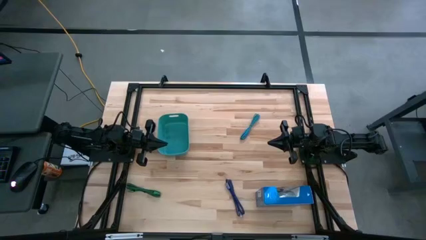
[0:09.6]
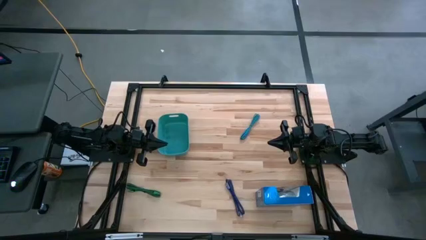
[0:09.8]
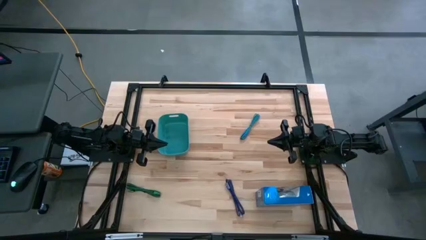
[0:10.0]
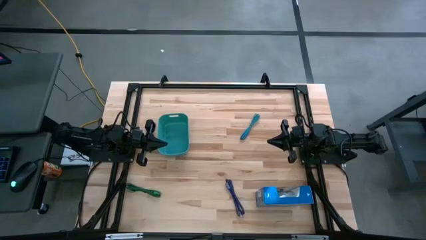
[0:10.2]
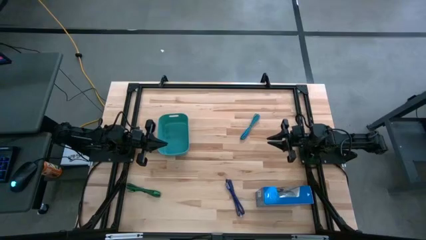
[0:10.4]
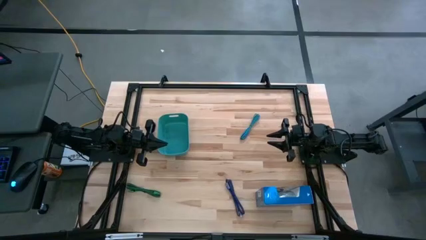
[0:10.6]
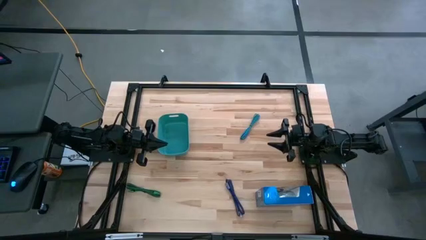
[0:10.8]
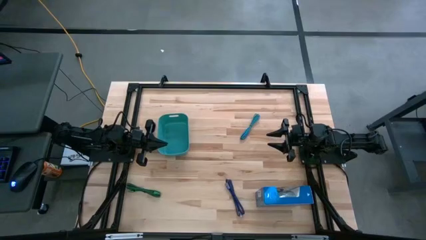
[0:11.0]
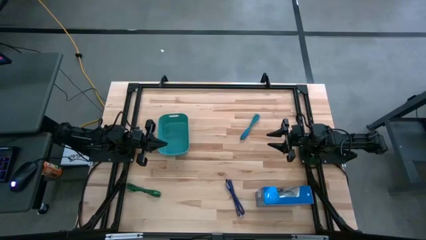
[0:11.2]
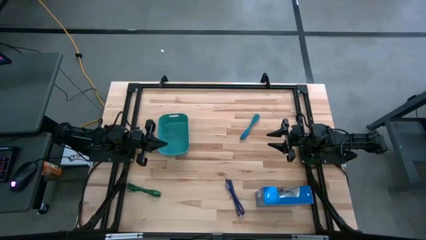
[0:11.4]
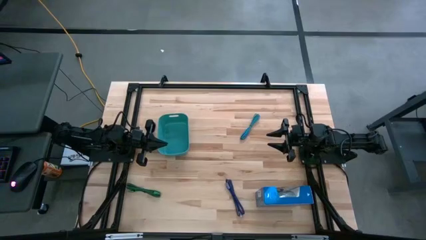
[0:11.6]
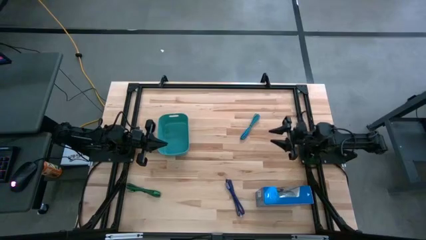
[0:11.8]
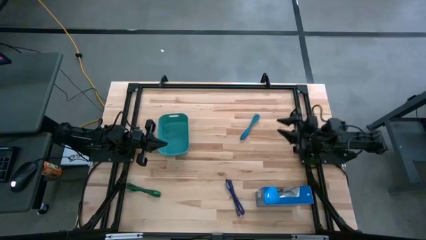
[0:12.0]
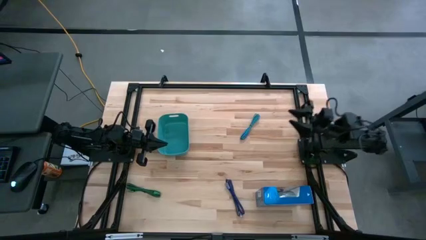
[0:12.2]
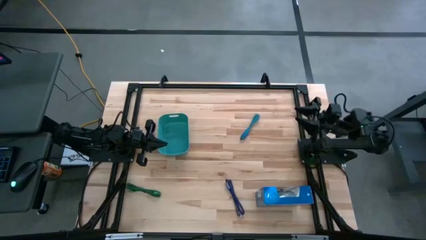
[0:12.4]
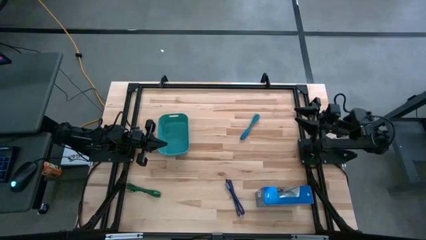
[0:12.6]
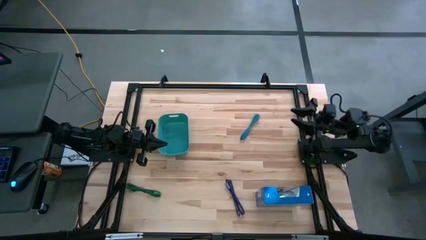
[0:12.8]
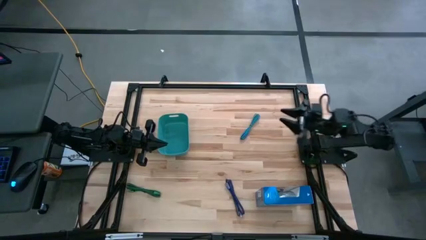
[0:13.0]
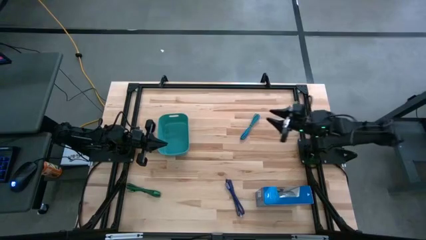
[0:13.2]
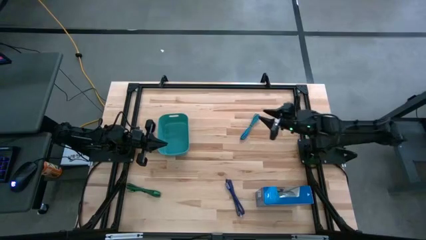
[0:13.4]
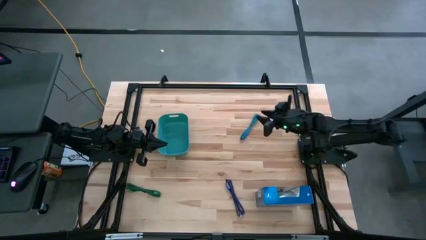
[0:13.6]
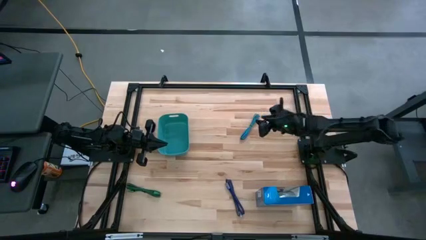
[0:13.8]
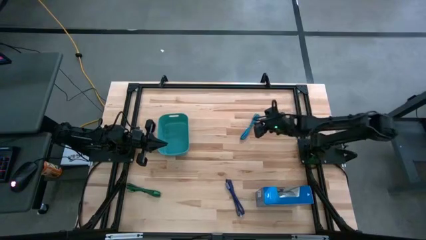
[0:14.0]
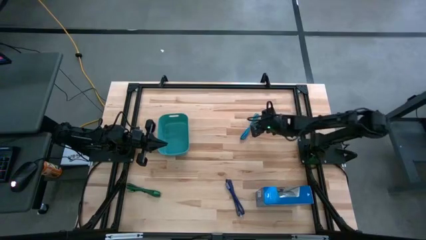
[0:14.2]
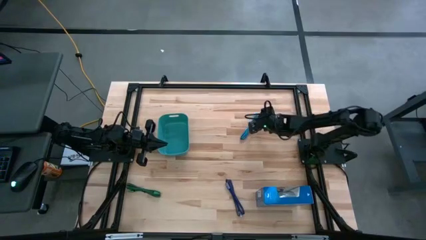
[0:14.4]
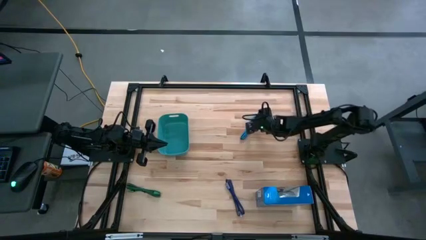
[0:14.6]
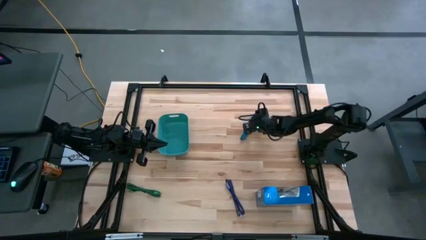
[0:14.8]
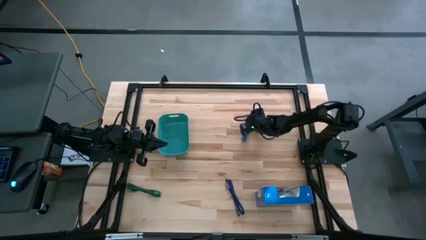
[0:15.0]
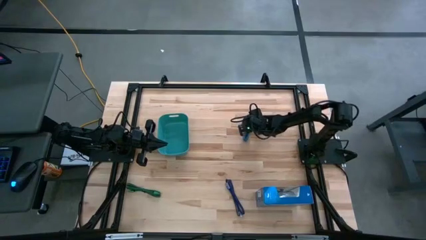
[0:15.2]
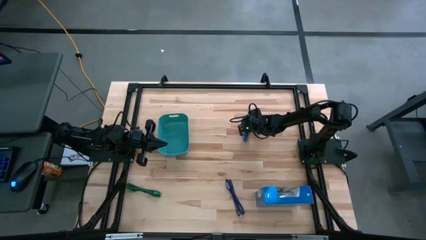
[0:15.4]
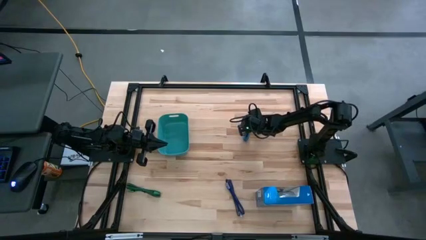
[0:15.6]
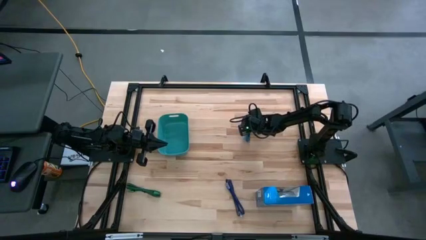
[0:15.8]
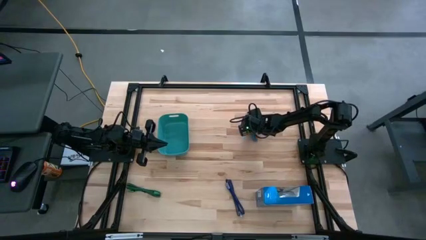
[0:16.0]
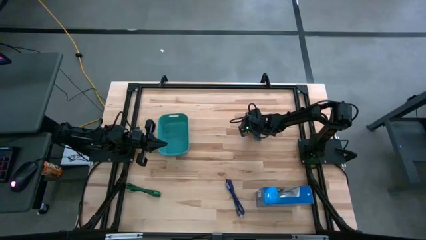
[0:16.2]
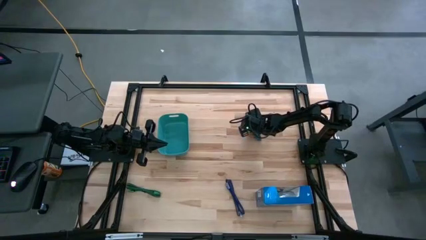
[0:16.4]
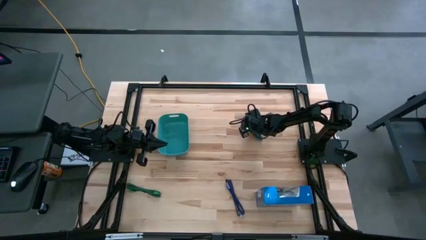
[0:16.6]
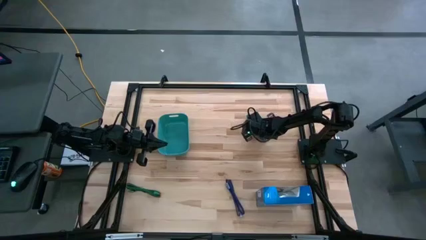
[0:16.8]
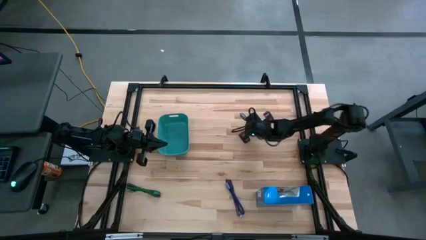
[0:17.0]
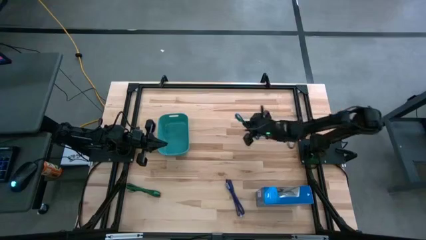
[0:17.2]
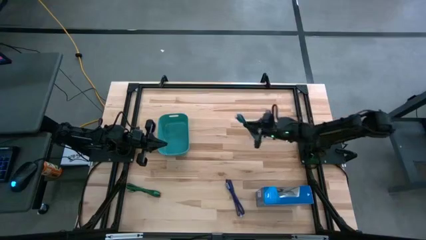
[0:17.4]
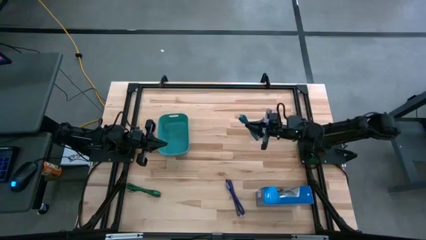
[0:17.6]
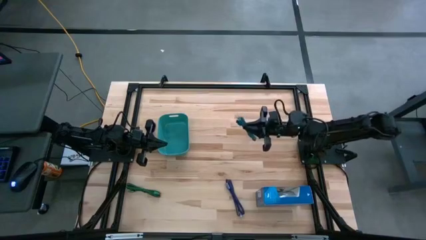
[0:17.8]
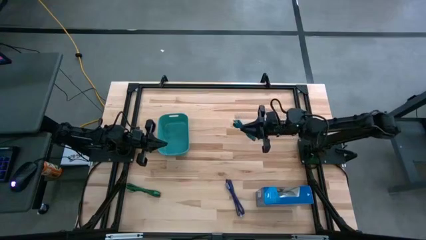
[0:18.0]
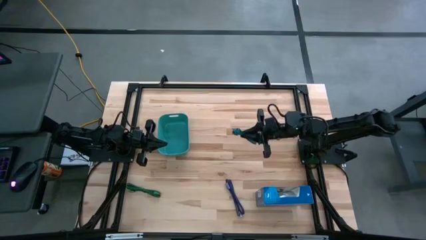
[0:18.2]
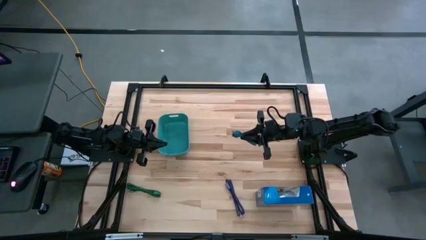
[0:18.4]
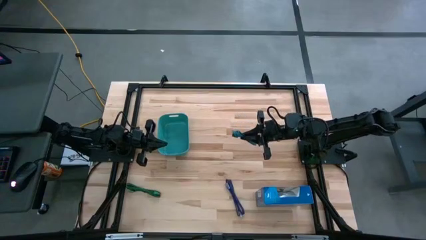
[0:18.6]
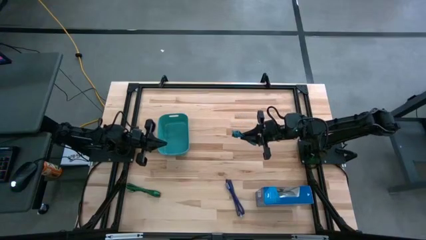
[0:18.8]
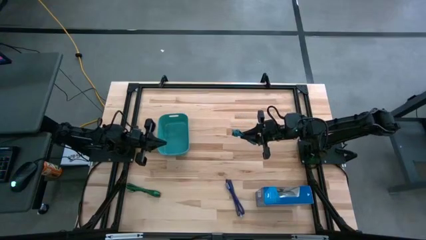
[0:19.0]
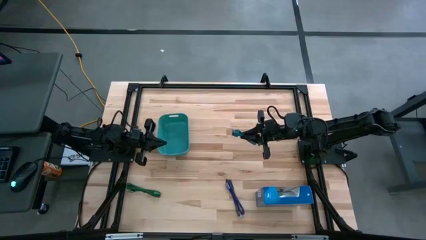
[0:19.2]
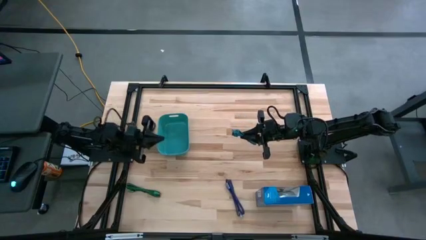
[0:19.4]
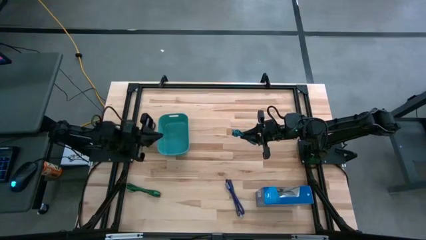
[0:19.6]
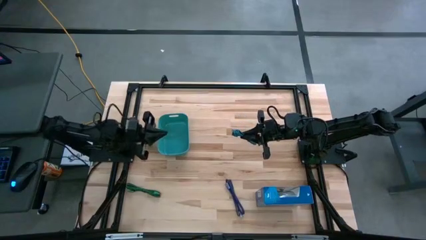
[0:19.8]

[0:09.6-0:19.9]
Task: Pick and place USB-C Cables
Put the blue charger cable into the bin

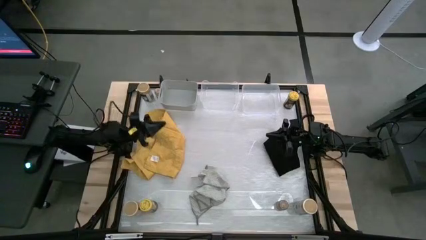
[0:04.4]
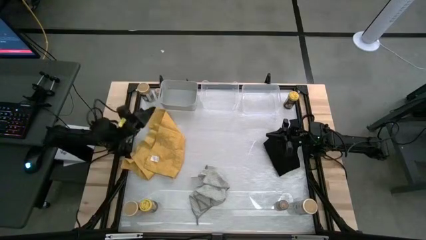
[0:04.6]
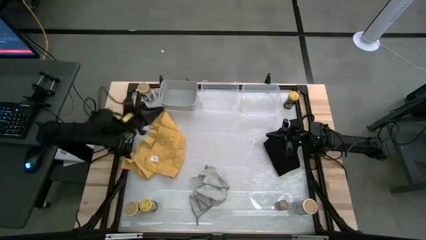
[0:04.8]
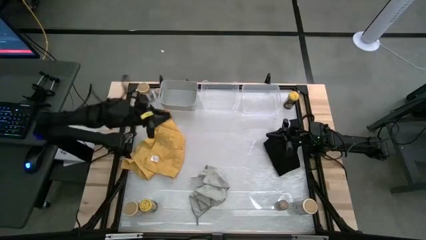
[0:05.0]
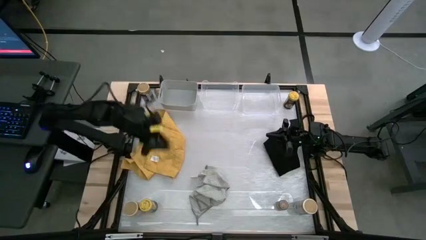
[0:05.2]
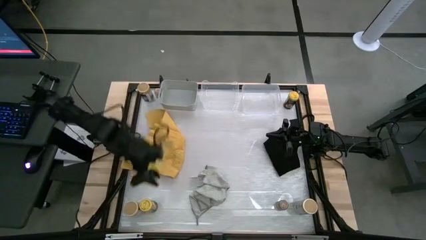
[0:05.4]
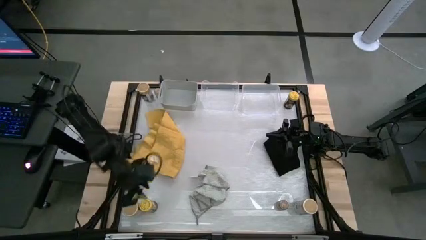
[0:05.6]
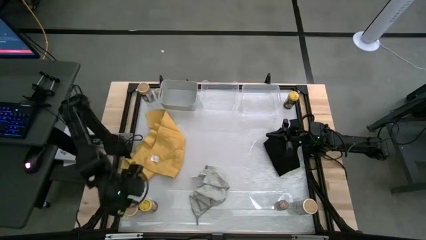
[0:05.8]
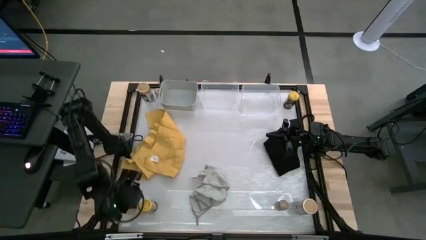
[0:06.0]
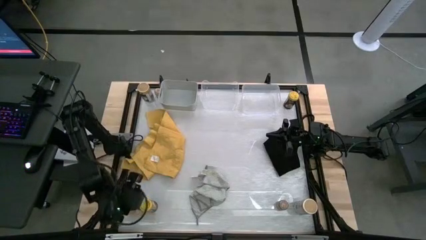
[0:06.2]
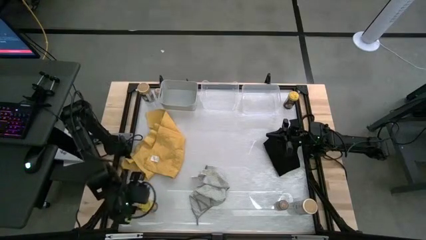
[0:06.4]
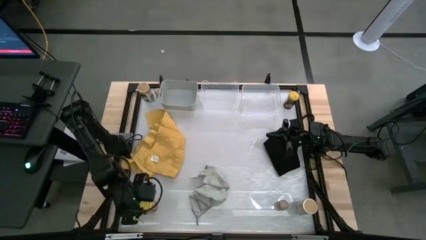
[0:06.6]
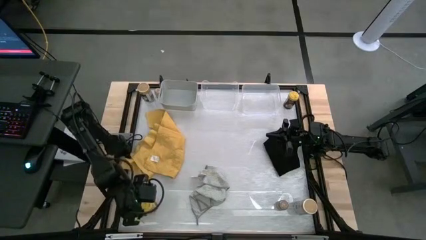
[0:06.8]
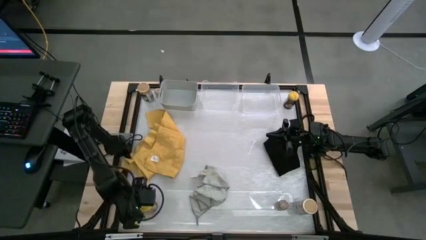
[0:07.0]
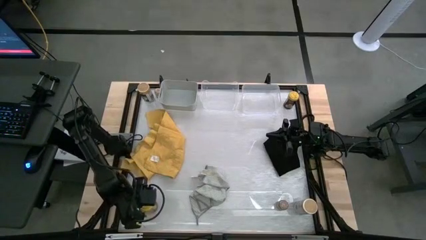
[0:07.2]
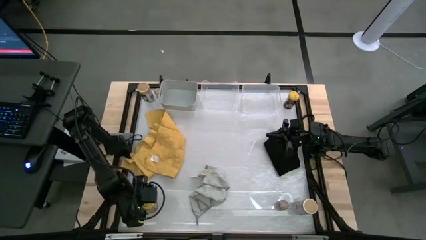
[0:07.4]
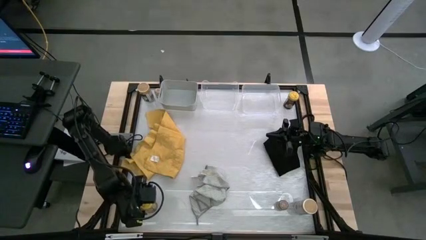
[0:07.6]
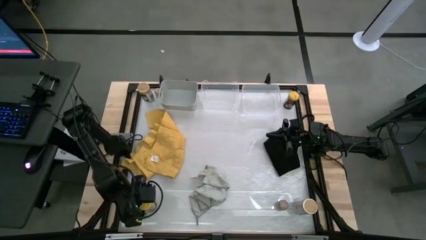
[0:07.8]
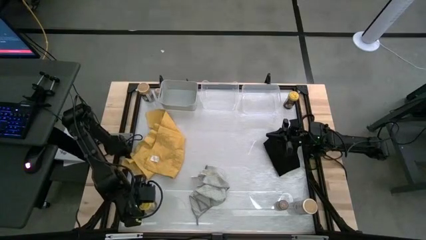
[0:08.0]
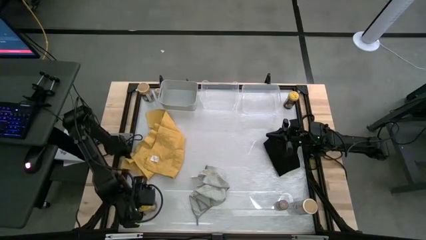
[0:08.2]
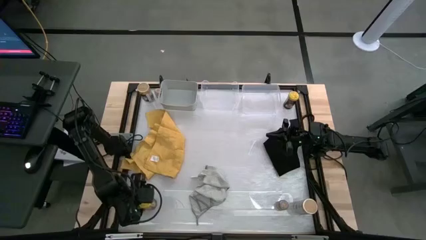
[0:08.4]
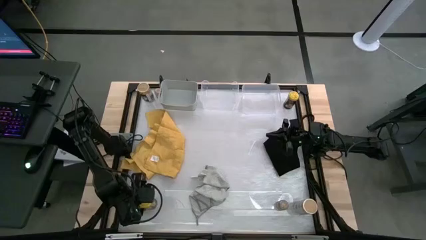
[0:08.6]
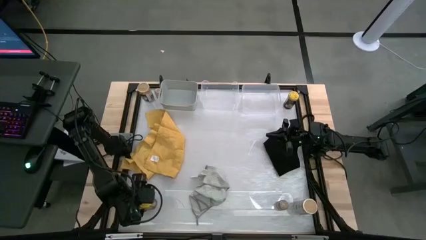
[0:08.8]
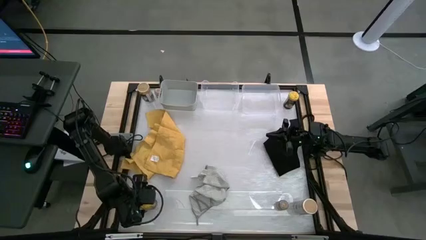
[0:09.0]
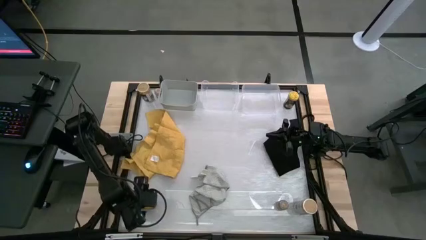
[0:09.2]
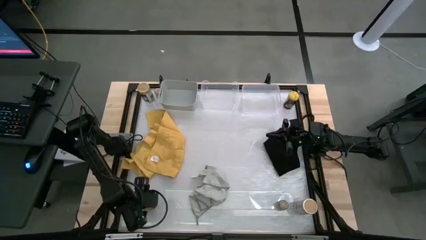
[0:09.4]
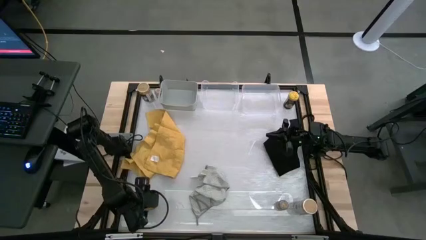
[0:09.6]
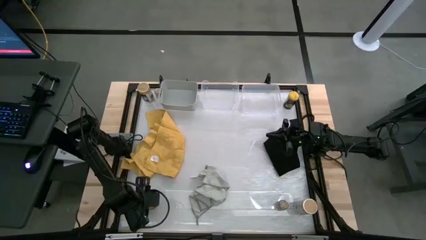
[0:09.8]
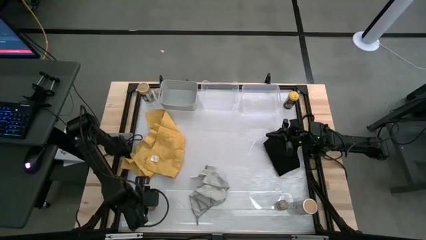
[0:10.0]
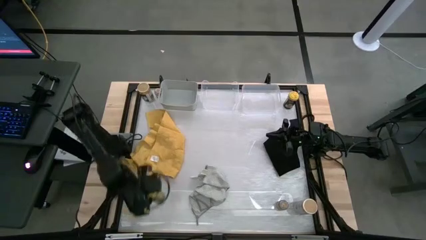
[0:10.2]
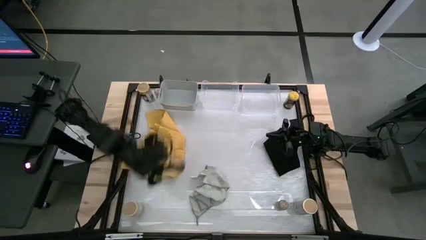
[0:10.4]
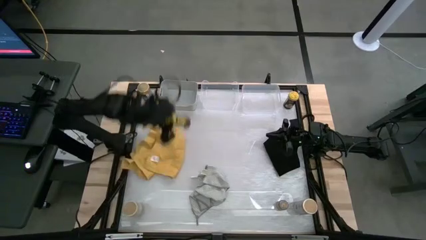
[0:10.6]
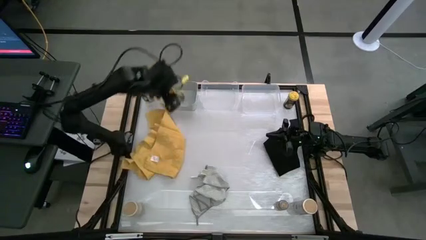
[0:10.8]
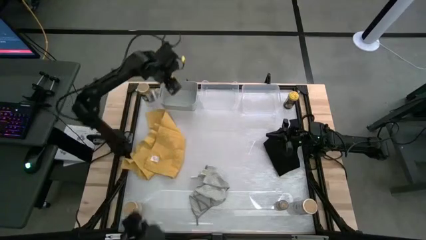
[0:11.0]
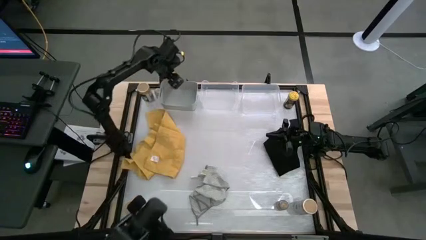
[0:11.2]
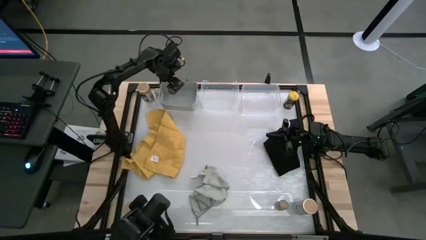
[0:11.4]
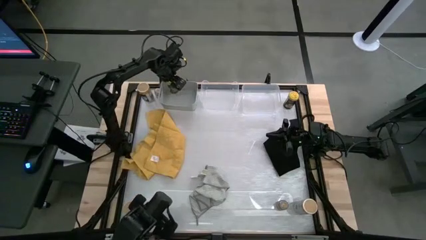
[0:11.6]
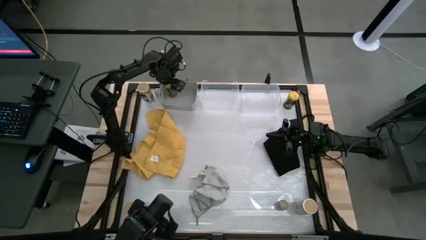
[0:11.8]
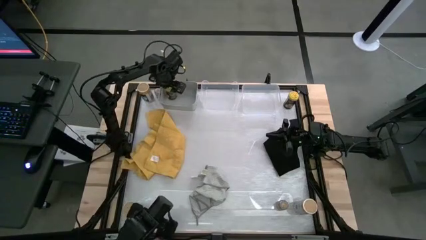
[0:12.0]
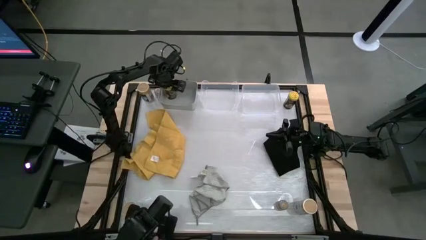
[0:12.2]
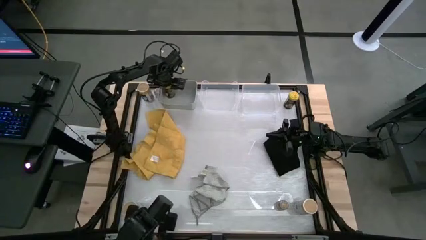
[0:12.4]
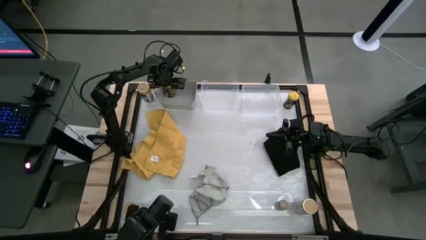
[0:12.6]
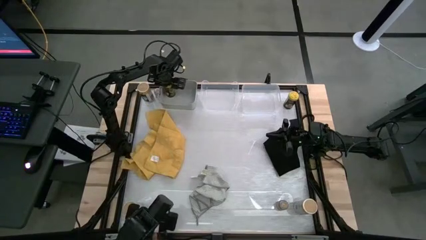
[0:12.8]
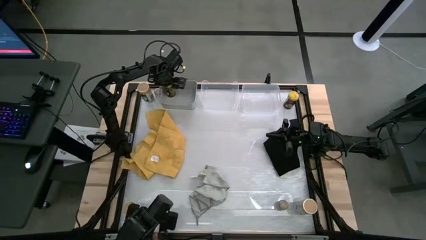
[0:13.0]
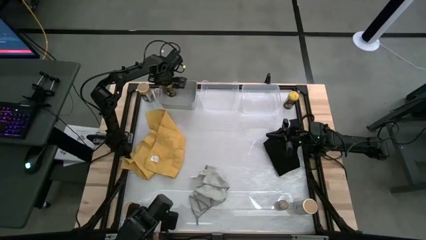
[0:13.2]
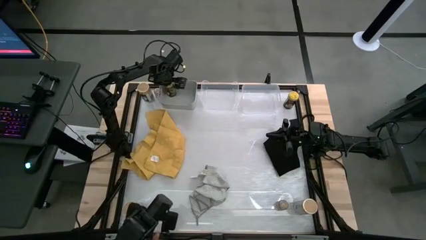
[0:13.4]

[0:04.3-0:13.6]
Task: Sort spices by type
Put the bottom yellow seasoning bottle into the gray bin
